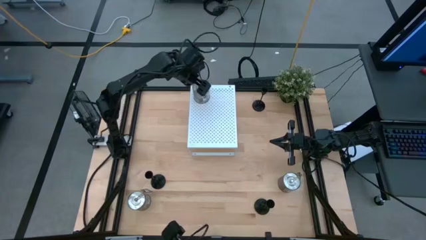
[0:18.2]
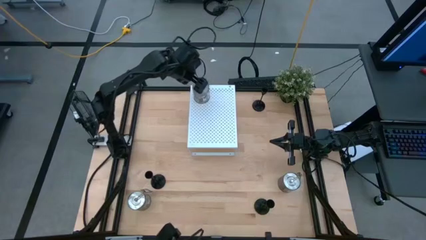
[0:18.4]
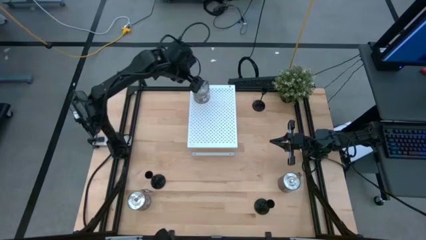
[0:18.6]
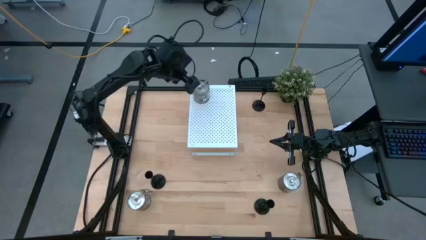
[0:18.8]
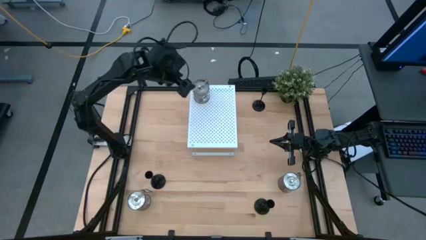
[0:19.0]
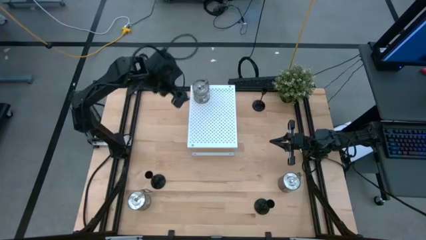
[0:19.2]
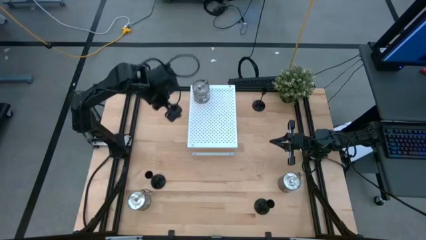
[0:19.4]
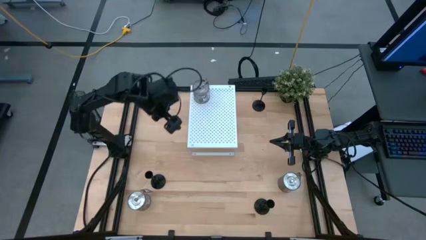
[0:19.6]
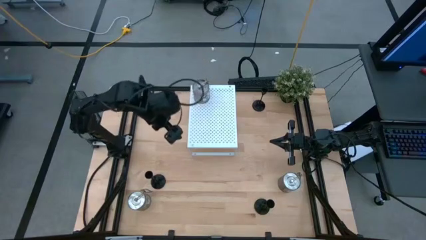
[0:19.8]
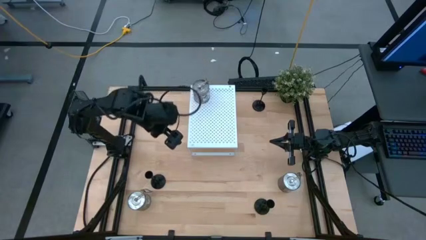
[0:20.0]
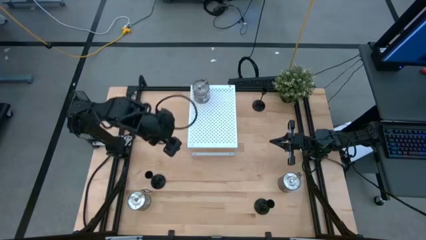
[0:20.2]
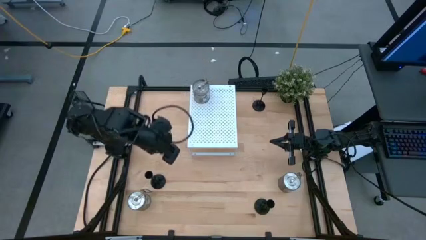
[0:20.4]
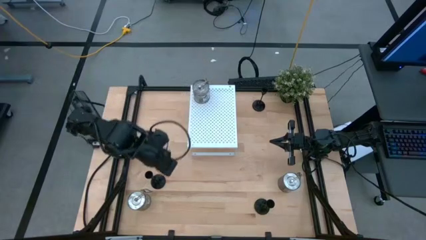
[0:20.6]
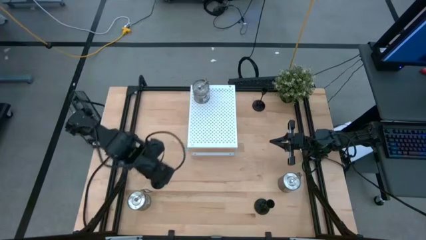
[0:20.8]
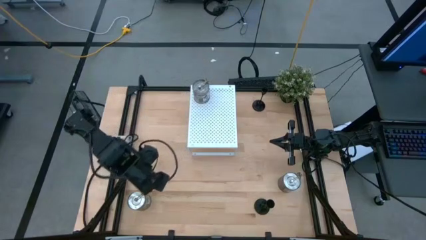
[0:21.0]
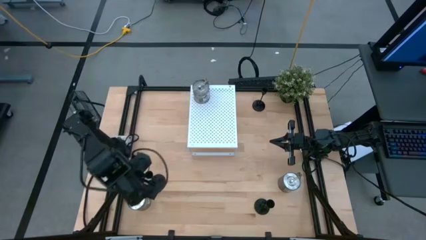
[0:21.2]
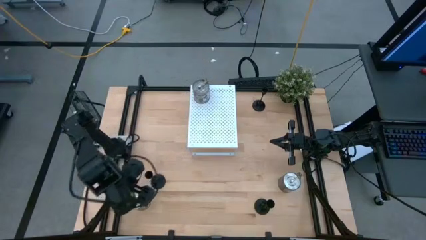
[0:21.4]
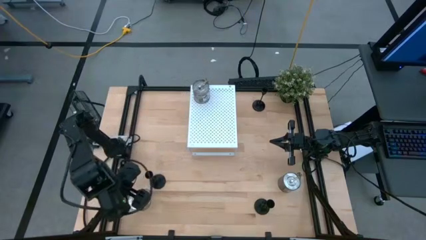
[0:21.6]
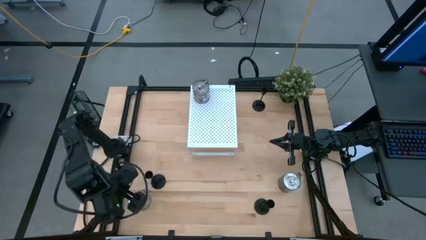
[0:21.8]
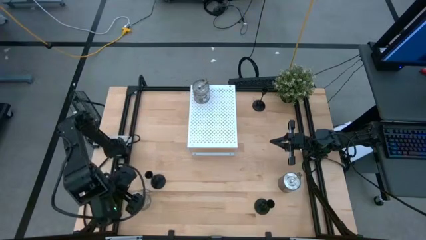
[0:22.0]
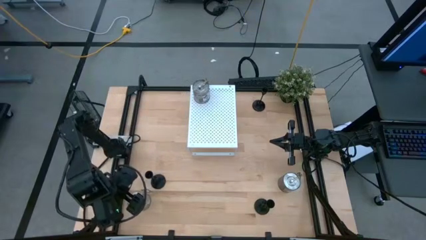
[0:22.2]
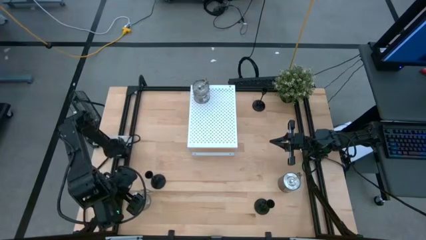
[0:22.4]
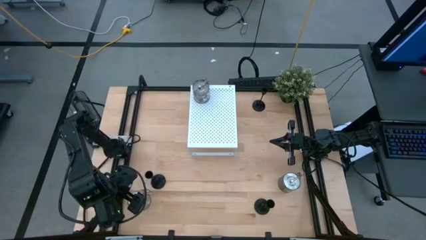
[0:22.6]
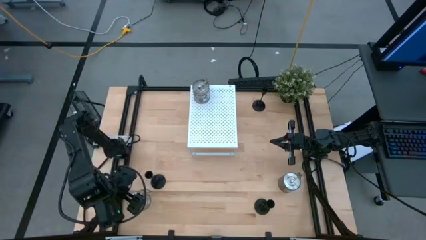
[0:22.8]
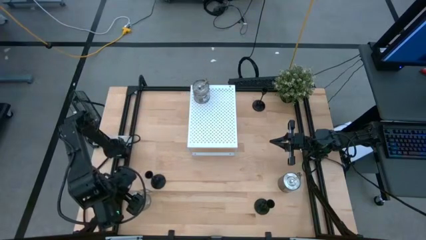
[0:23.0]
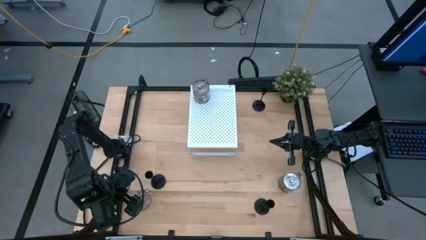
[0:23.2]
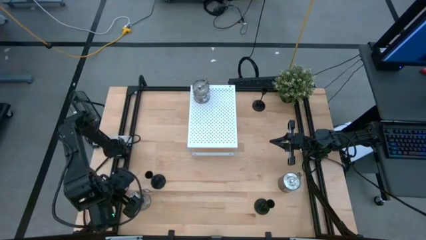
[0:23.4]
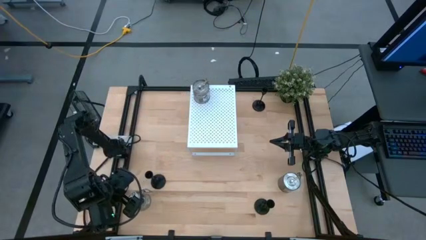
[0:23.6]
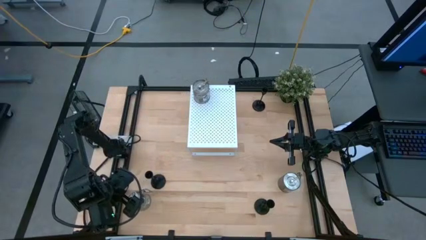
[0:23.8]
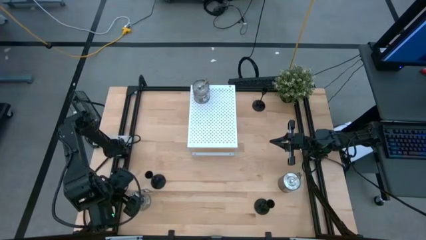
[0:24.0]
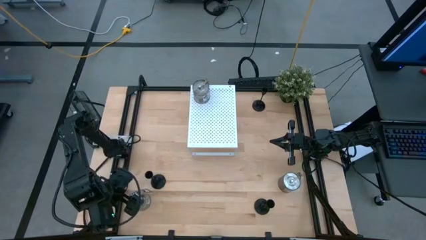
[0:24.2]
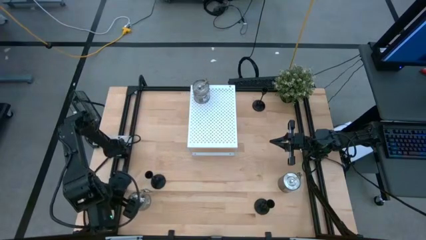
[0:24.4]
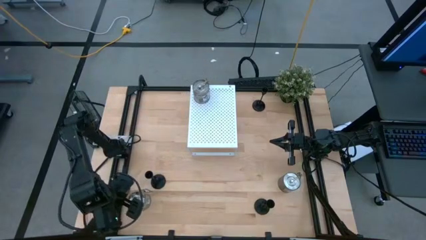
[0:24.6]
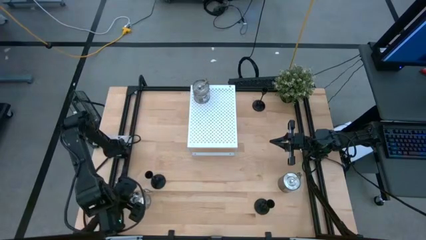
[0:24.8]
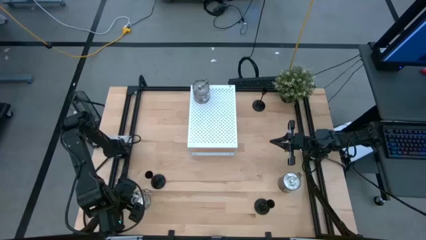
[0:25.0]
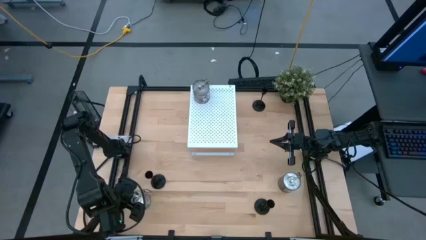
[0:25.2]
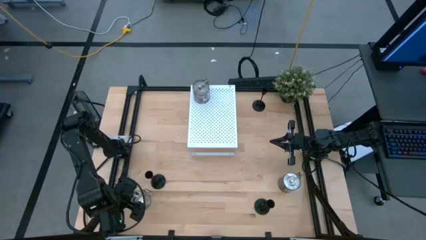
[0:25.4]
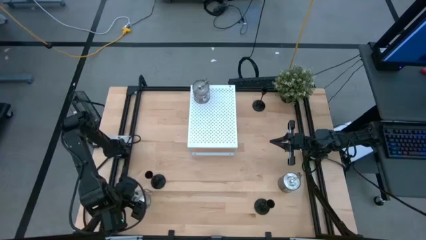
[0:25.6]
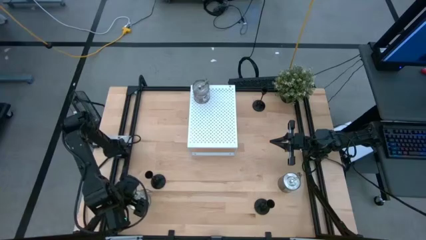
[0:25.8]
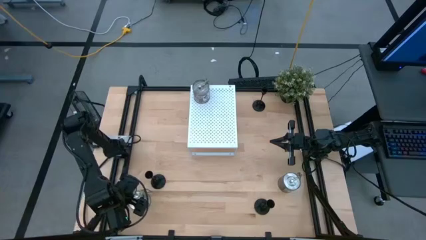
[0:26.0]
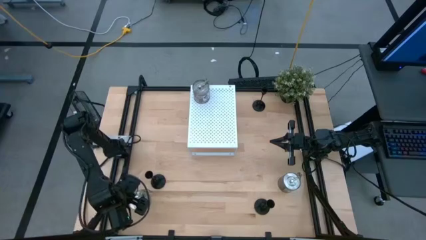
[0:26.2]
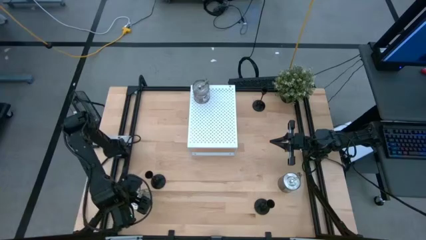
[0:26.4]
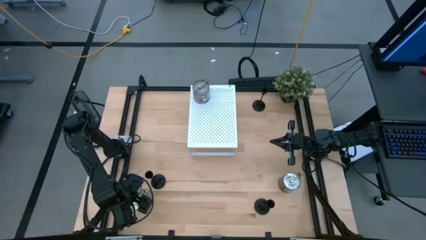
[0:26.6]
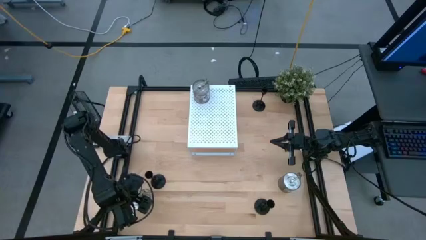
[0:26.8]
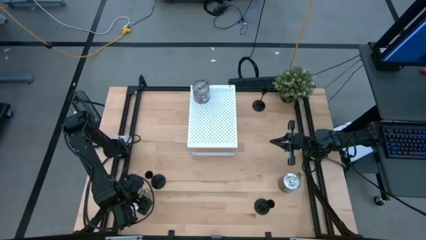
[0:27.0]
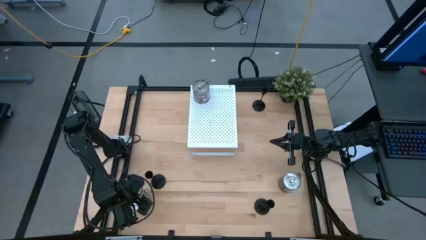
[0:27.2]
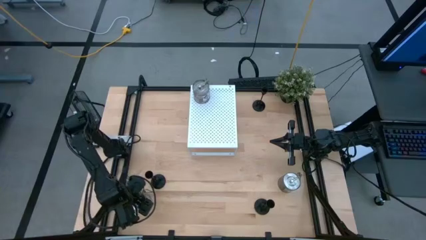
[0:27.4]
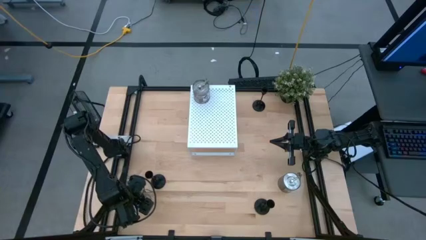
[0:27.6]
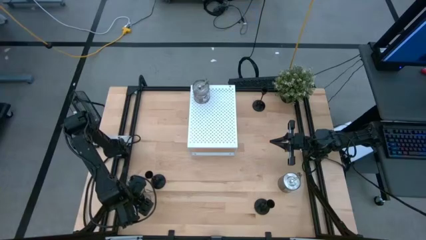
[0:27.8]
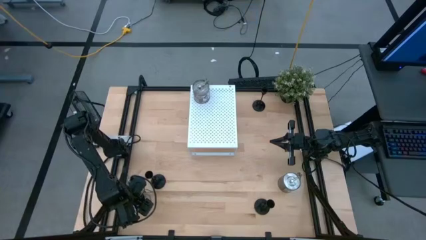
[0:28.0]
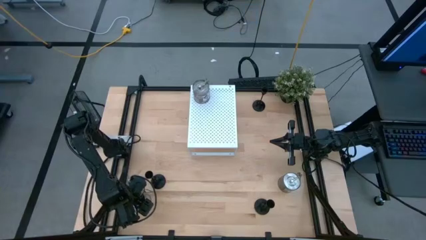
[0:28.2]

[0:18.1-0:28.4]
Task: Pick & Place candle stick holders
Put the left silver scented candle on the shelf
